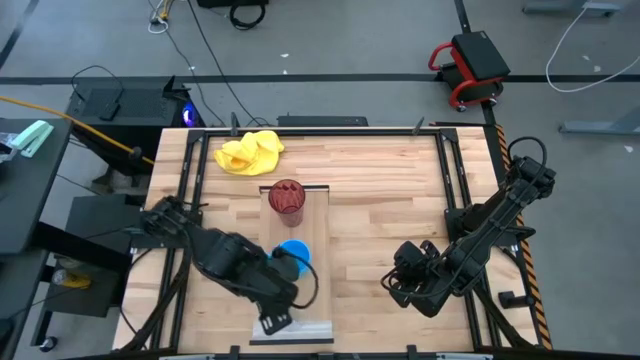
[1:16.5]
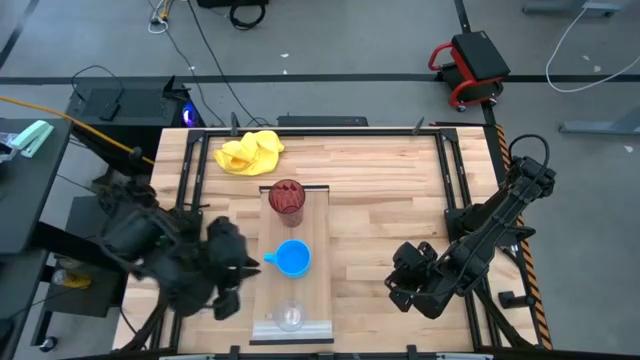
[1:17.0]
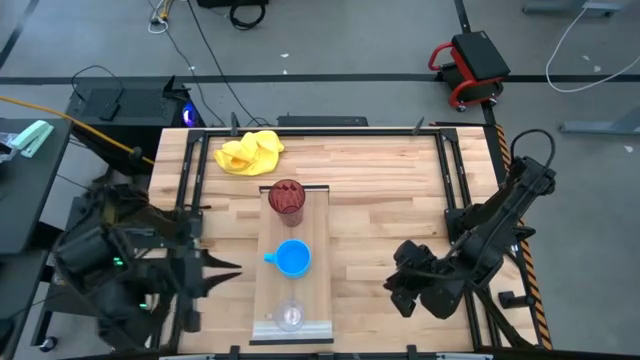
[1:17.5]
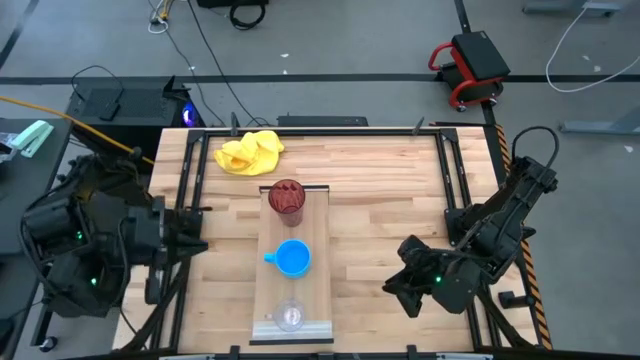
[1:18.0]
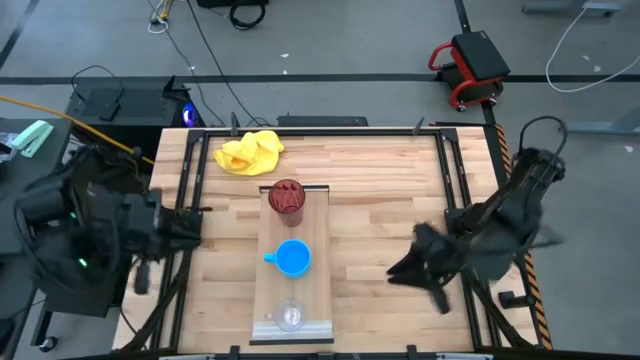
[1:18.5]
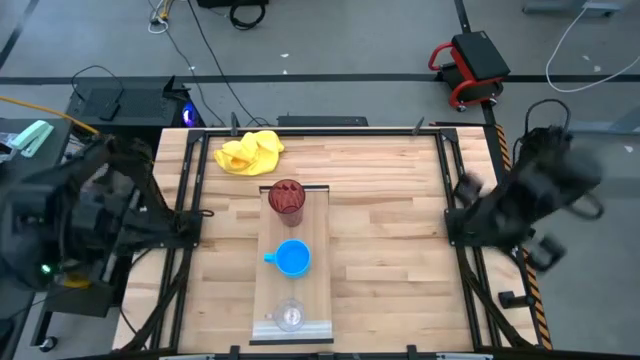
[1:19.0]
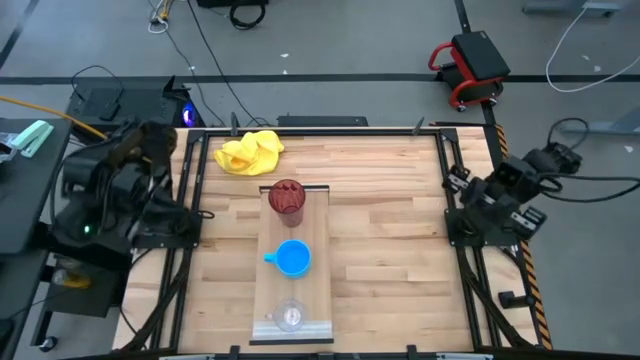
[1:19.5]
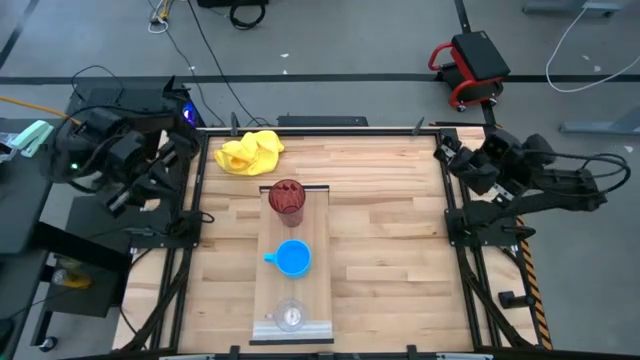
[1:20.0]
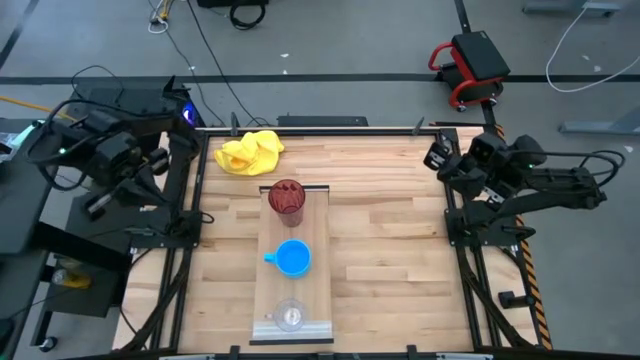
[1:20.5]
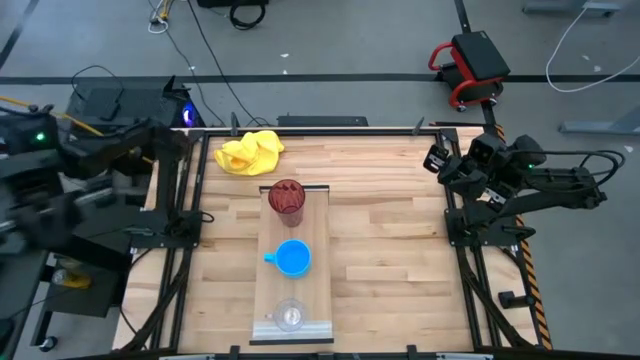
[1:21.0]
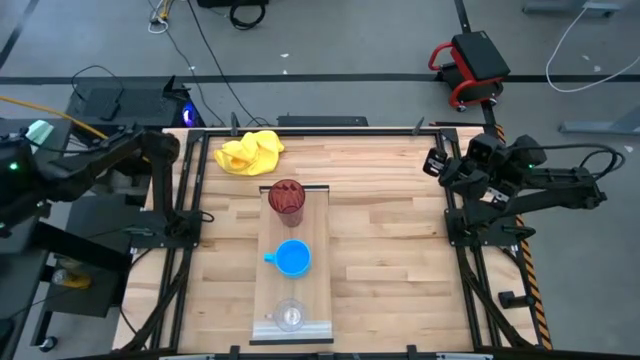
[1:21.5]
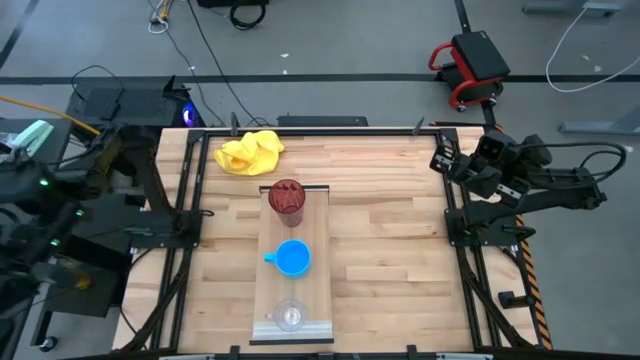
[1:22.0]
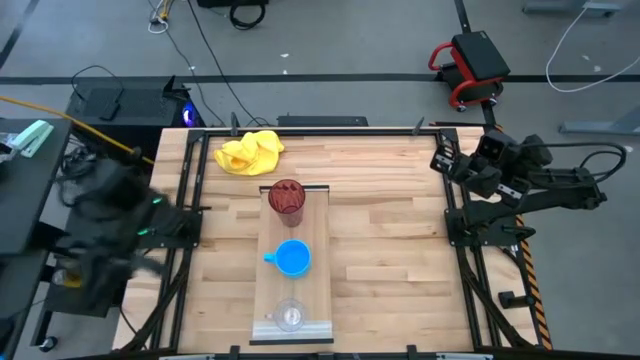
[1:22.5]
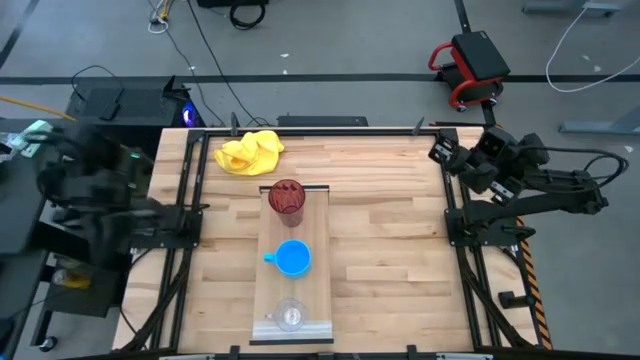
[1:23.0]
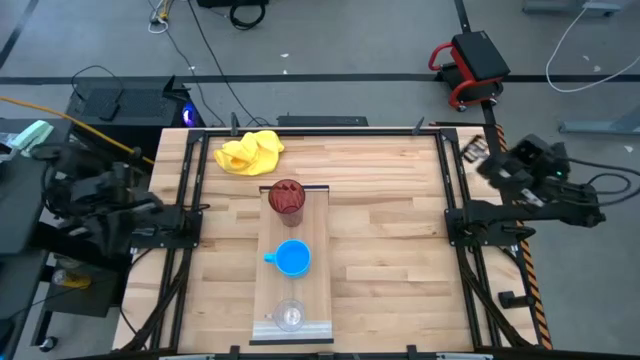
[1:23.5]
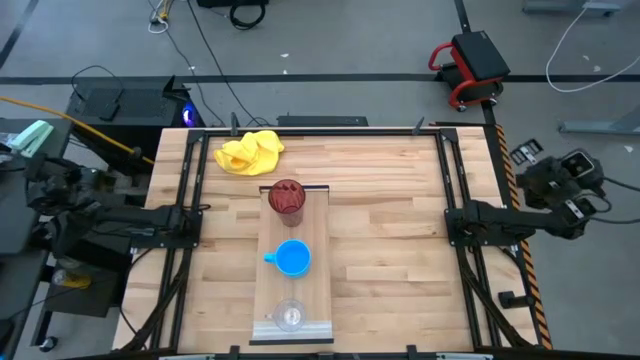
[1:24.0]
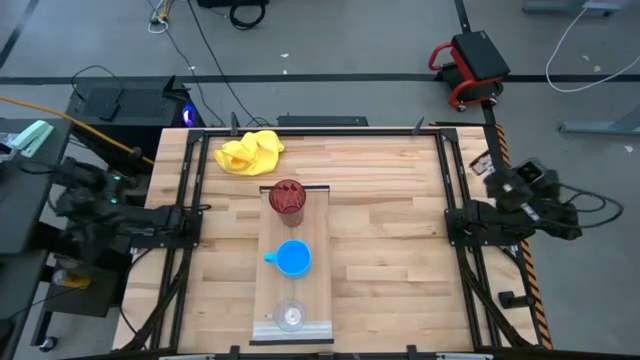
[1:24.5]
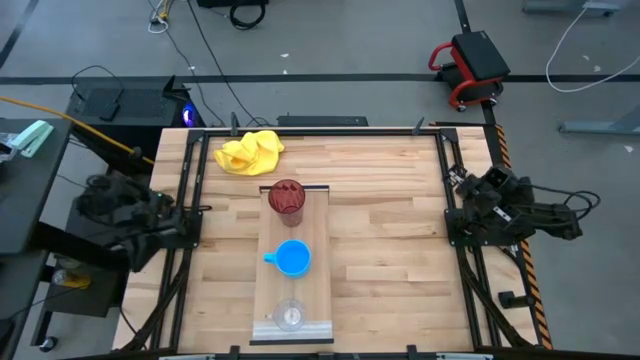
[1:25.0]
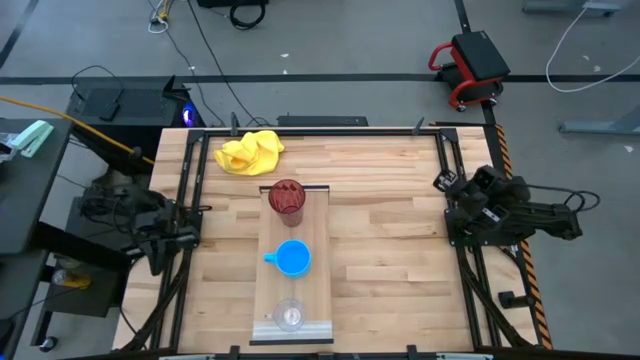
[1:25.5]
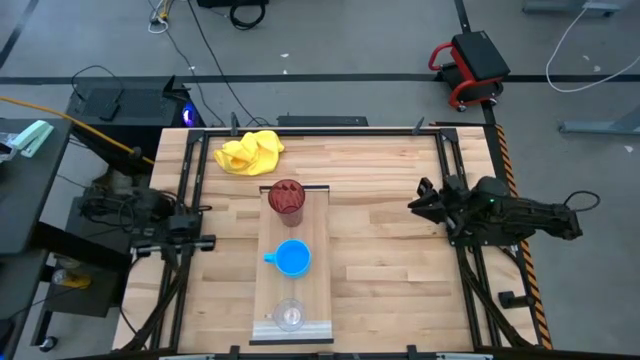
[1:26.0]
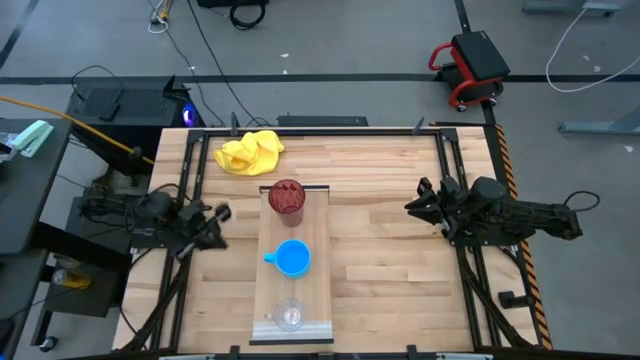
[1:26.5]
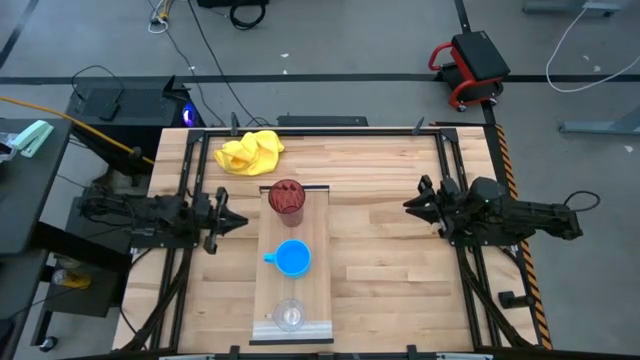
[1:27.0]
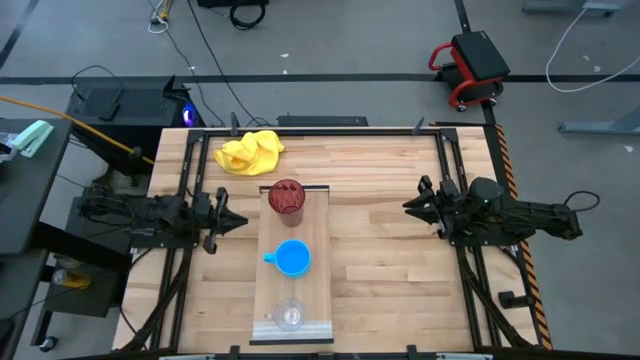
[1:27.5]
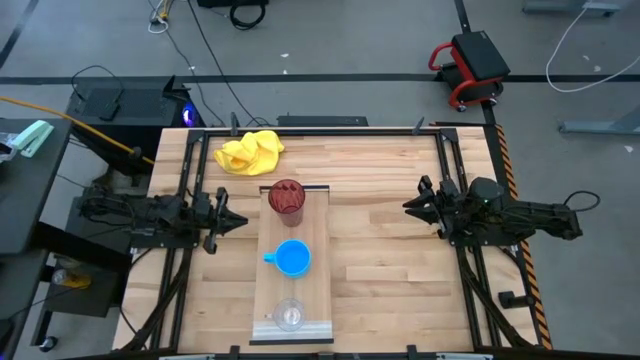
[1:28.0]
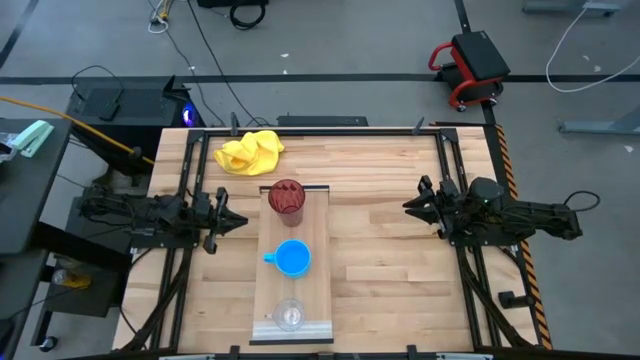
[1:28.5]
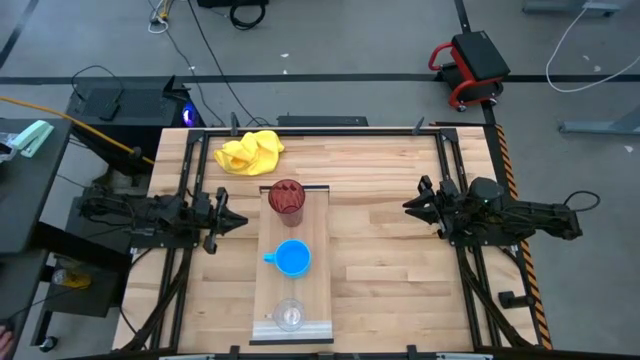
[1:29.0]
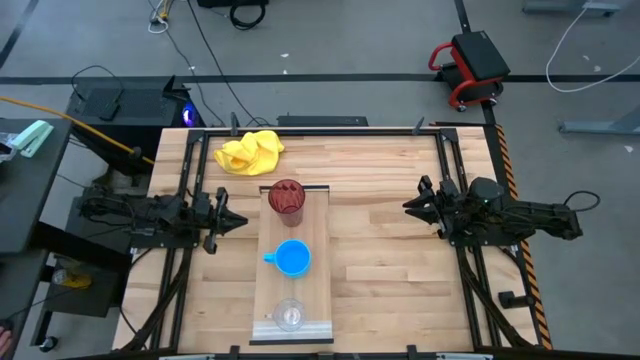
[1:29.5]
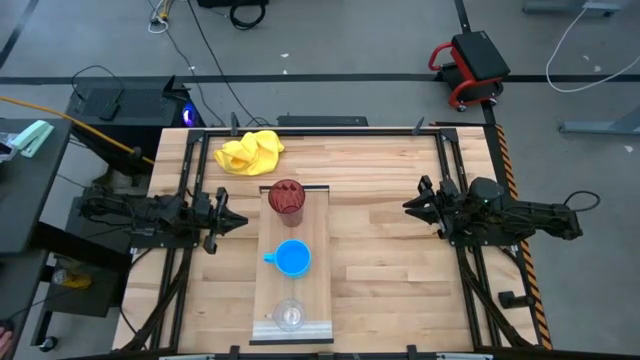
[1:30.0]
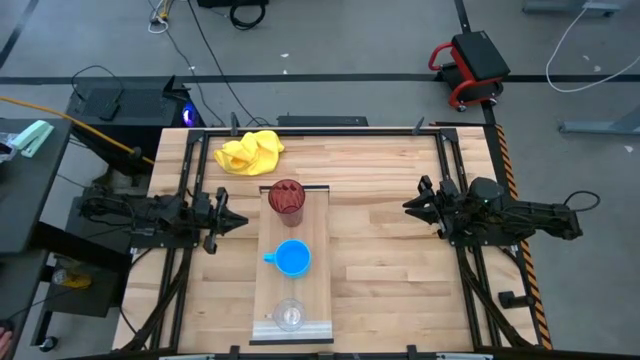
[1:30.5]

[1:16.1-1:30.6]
Task: Stack small to large cups/mugs on shelf
Return to Home Position

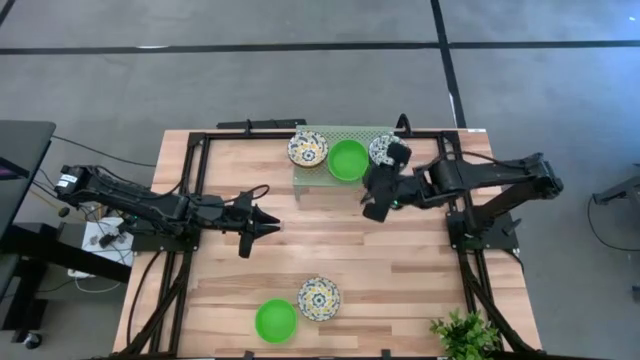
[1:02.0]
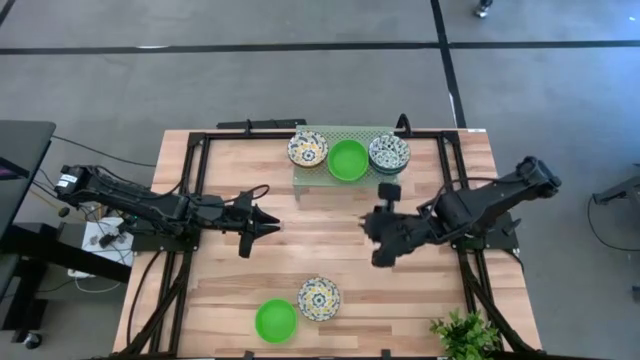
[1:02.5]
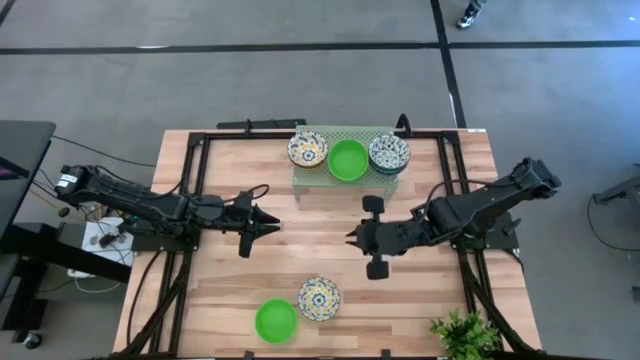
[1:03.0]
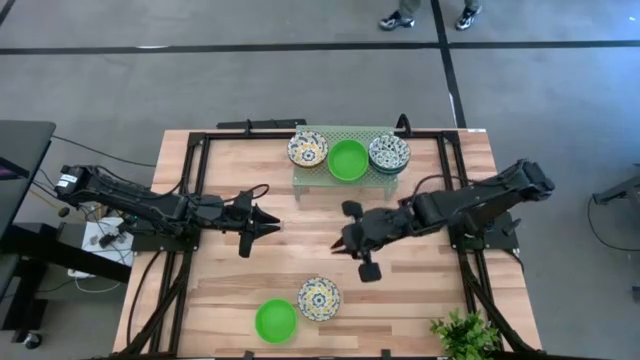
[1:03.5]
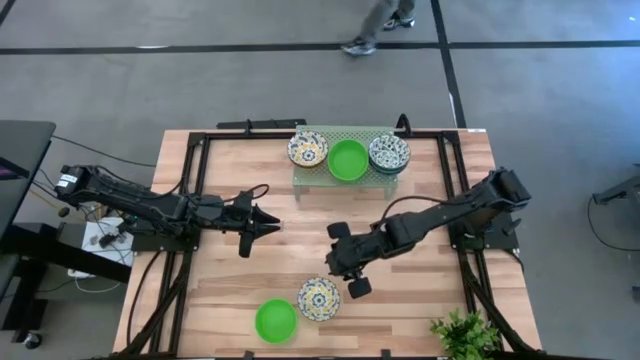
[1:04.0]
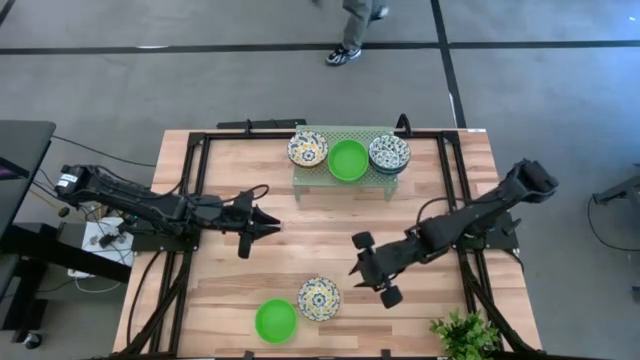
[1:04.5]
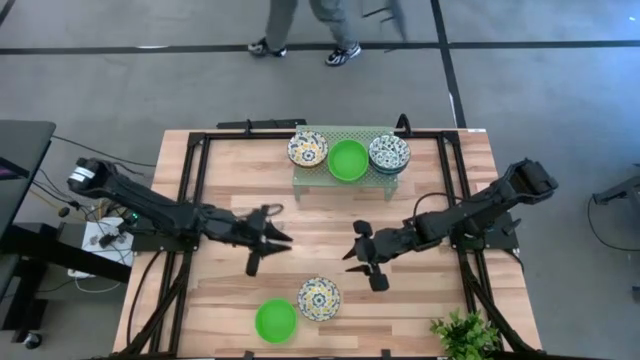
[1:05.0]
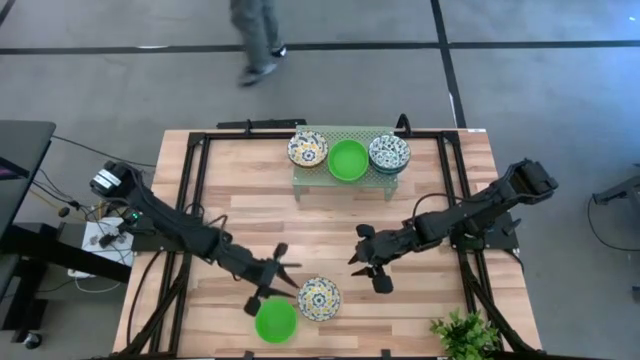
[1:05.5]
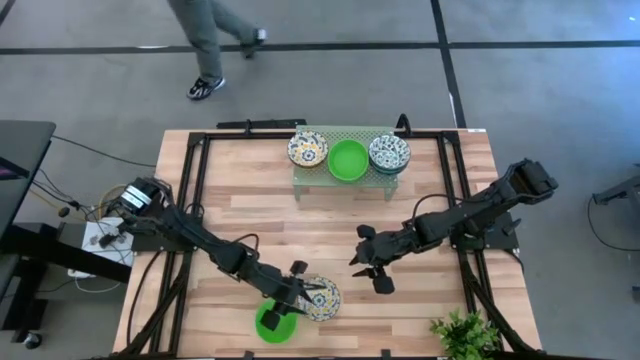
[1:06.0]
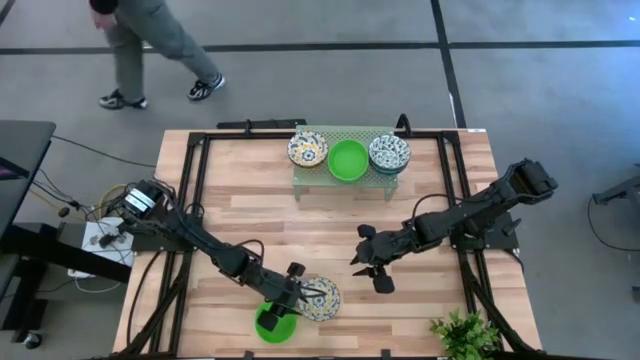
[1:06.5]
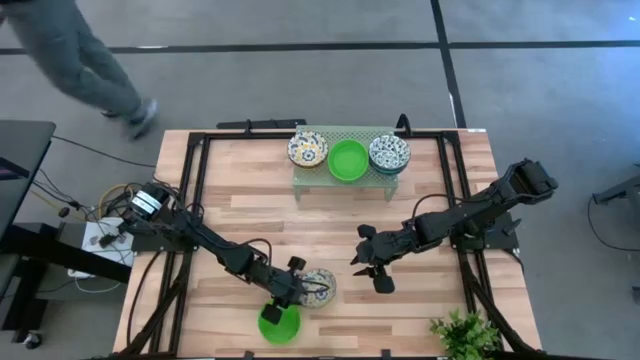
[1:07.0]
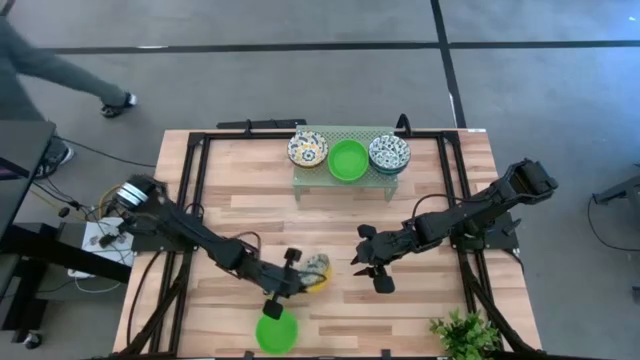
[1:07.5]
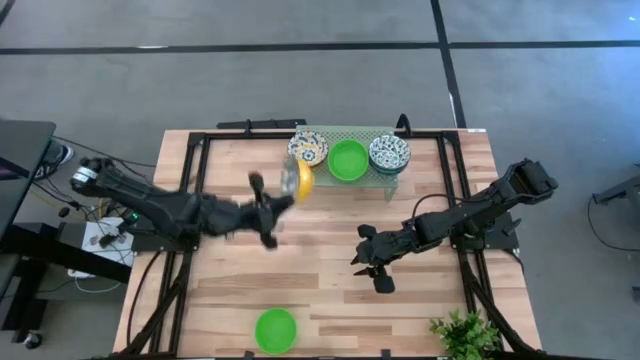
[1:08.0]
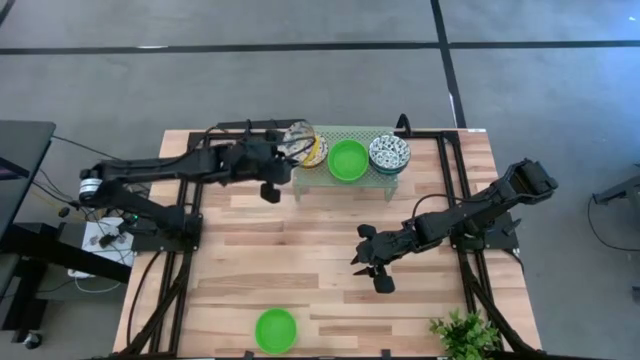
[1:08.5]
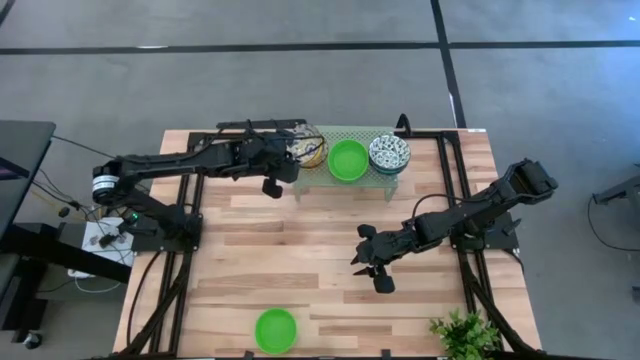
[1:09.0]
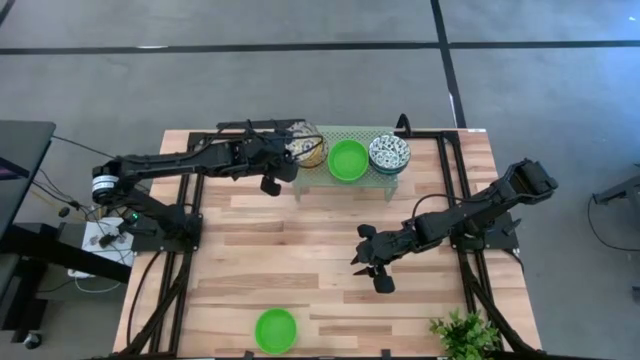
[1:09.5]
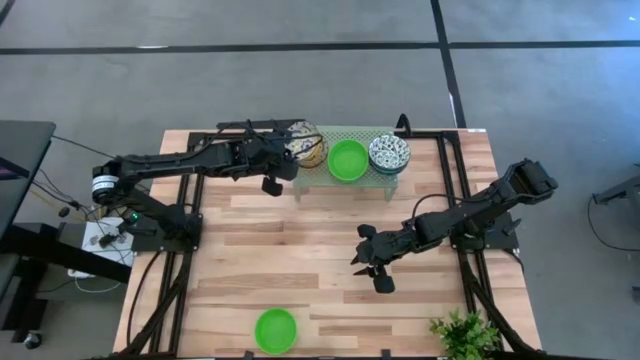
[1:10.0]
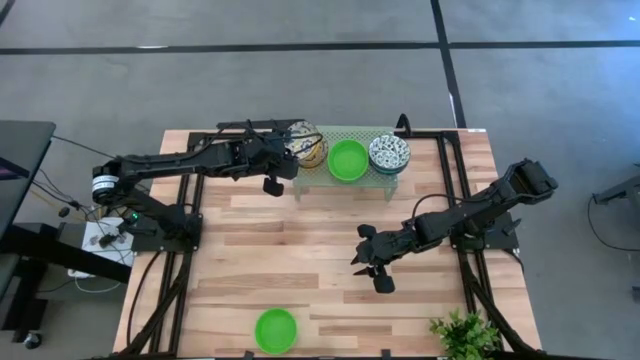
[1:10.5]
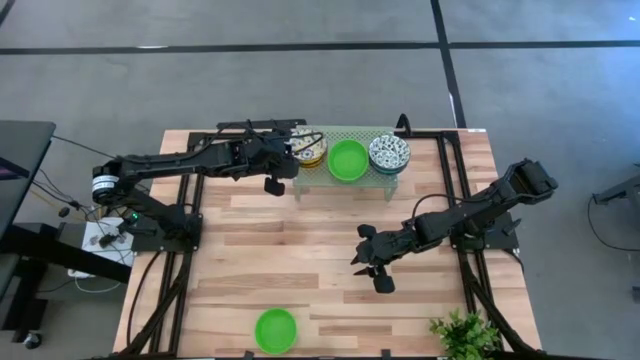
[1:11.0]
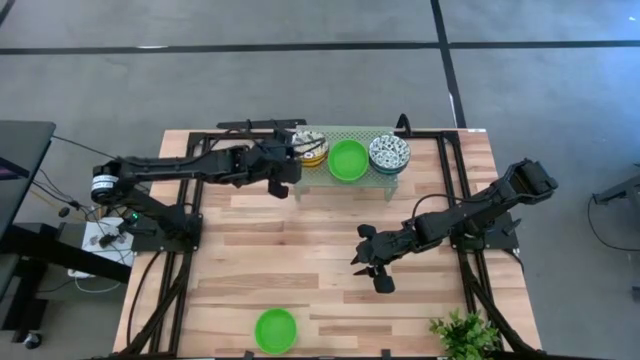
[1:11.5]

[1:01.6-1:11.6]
Task: Pick & Place Mini bowls
Stack the yellow bowl on the yellow bowl on the shelf
